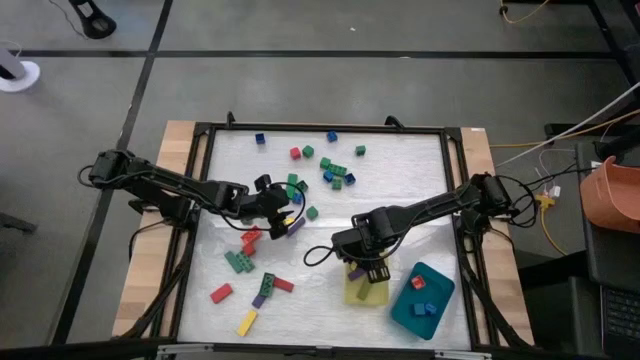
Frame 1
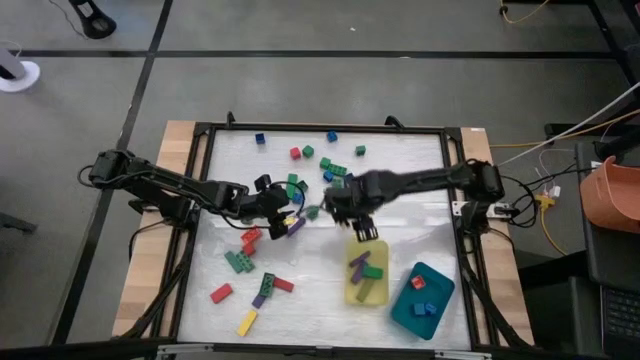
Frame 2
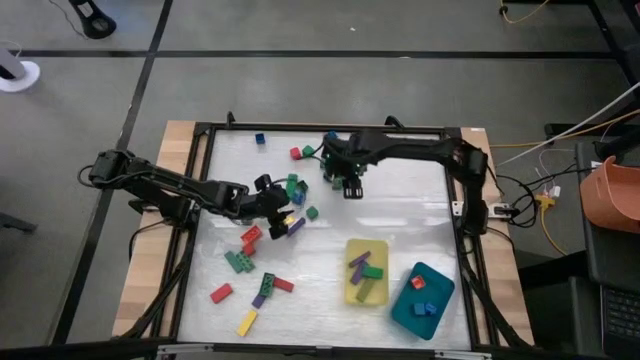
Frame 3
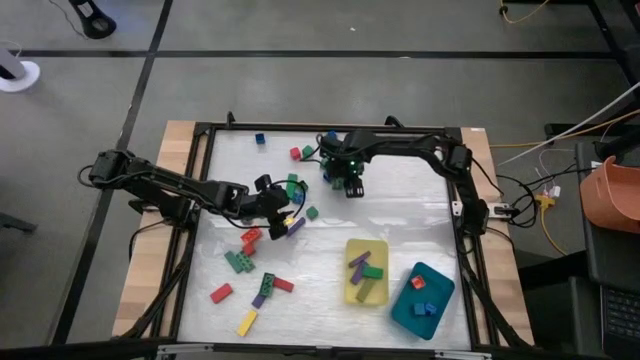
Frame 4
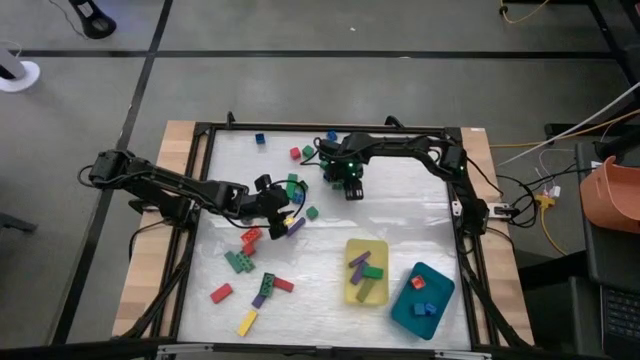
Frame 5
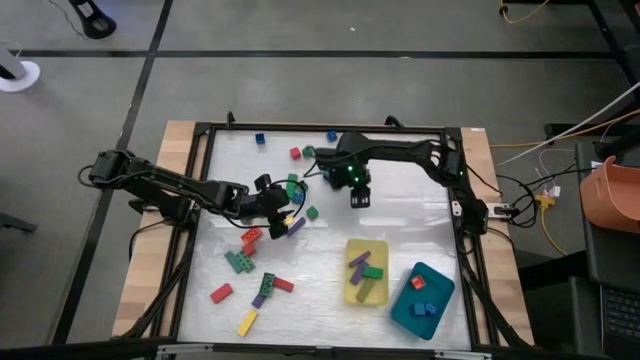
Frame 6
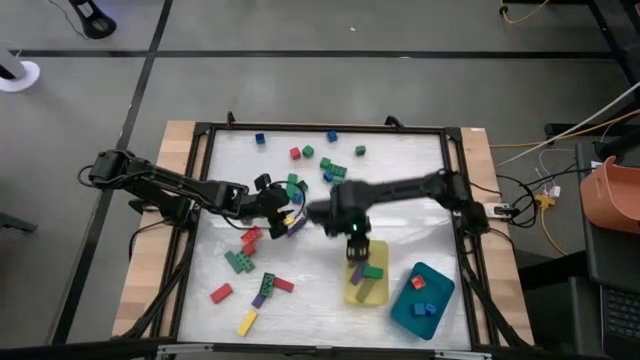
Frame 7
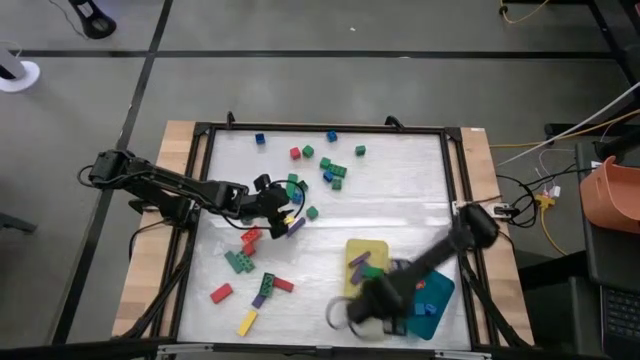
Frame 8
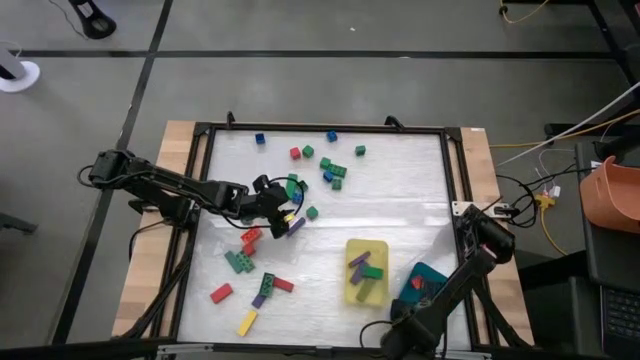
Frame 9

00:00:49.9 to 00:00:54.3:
Task: Sort blocks by size
Put the small blue game piece into the blue bin

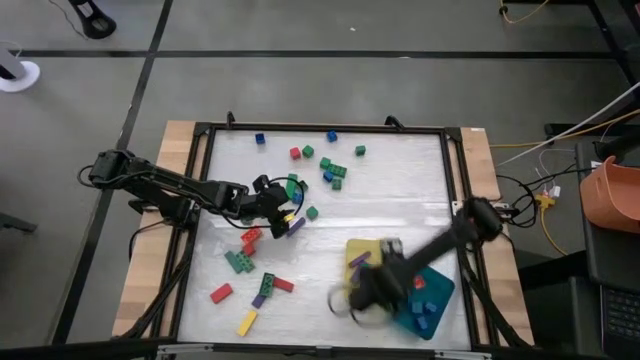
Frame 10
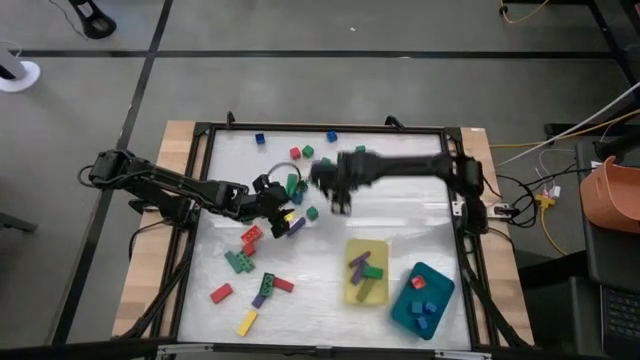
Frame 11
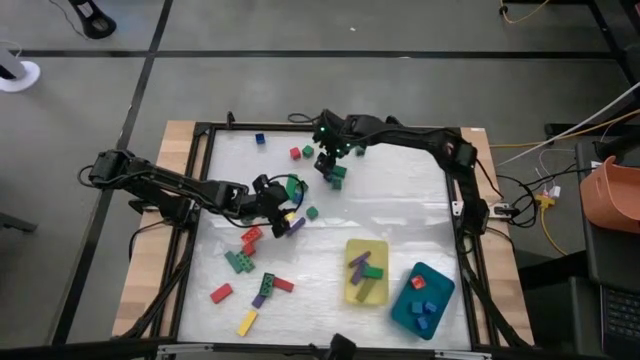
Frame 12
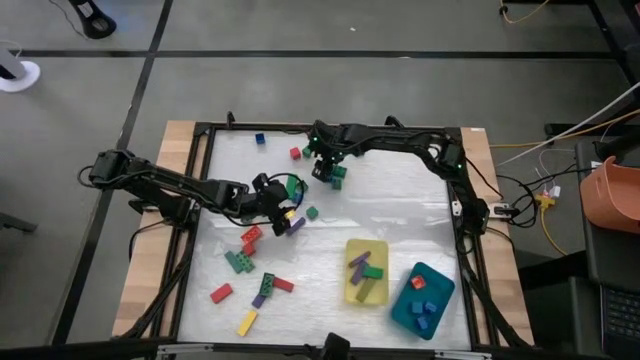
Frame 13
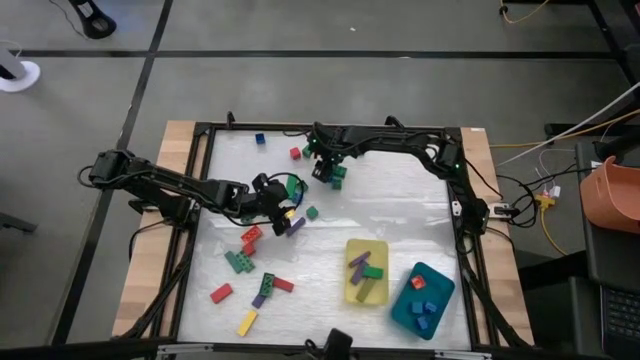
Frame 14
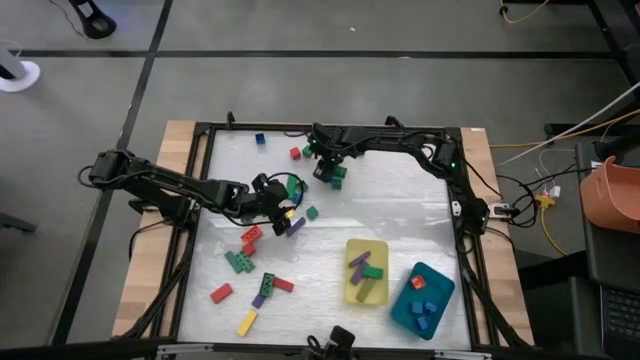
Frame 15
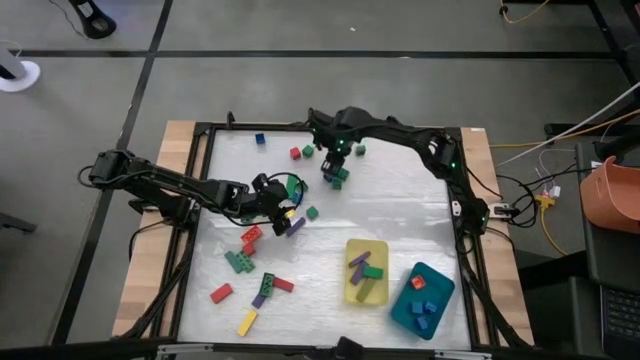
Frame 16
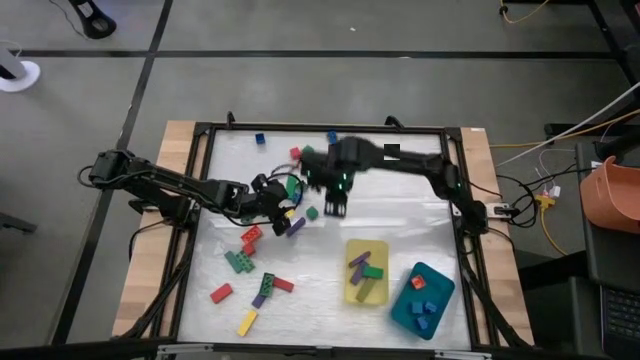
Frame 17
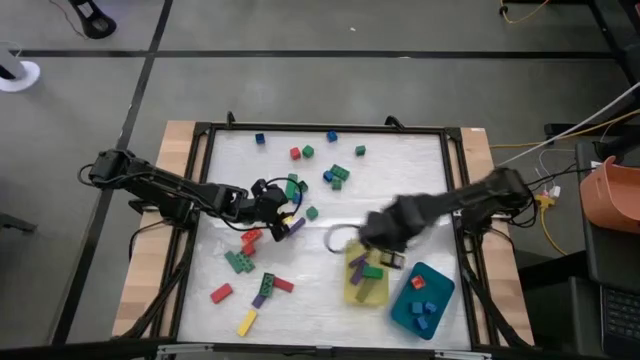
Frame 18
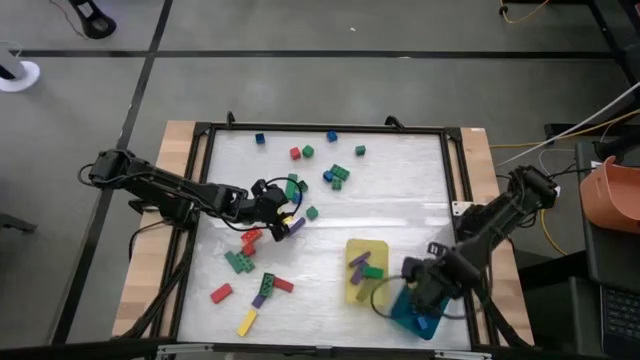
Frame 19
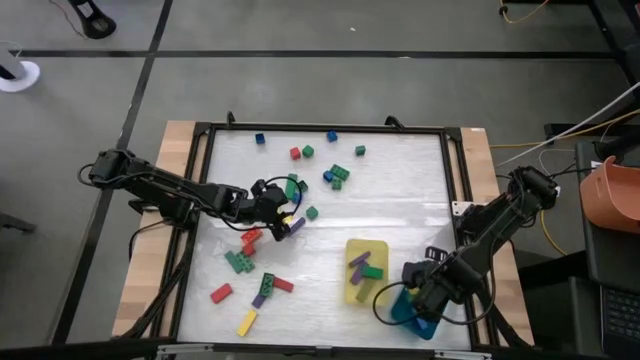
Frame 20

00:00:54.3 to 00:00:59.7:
Put the small green block into the blue bin

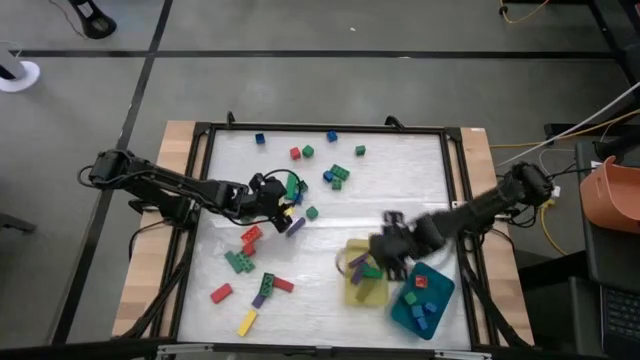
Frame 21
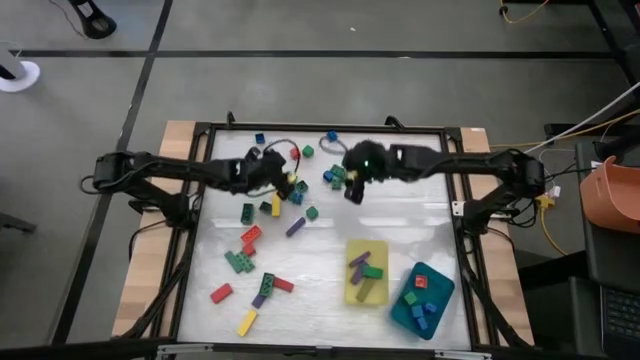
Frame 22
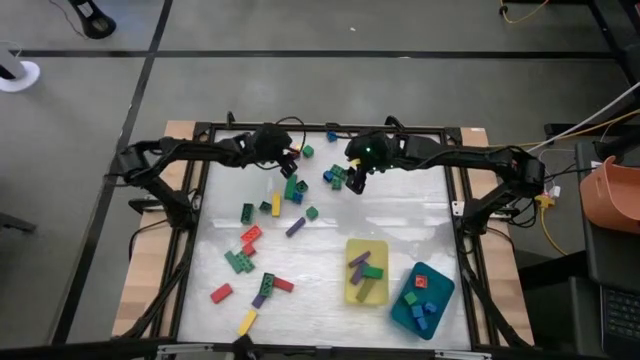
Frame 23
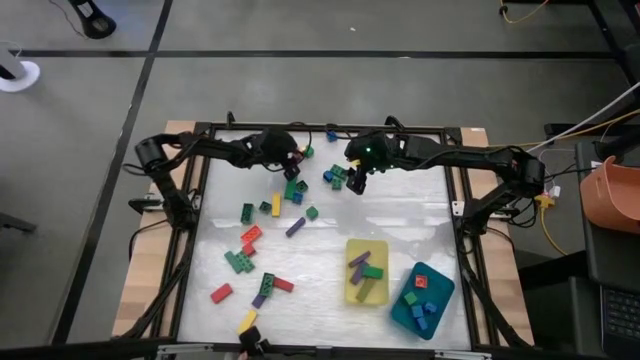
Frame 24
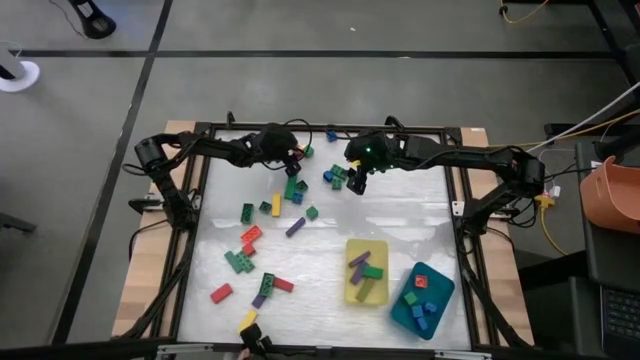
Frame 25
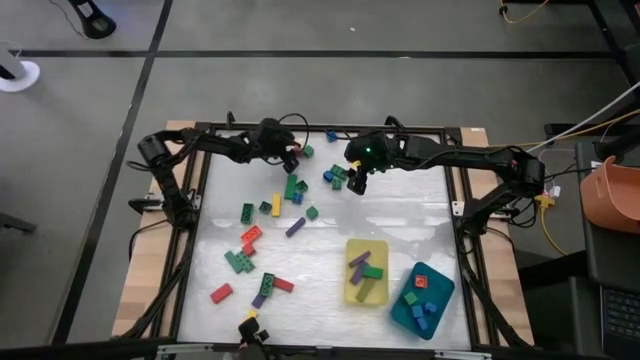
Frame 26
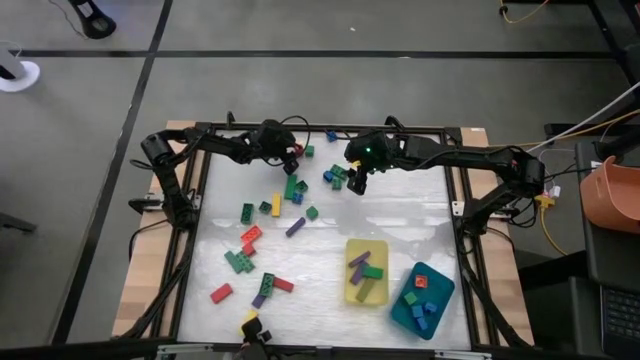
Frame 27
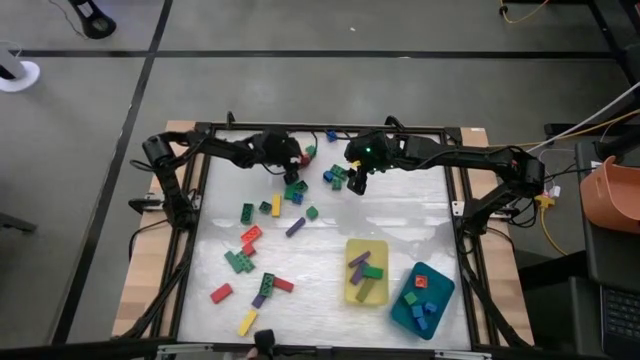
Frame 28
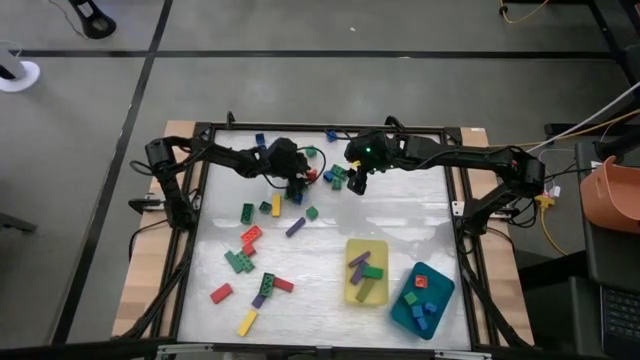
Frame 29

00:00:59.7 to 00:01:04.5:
Put the small orange block into the blue bin

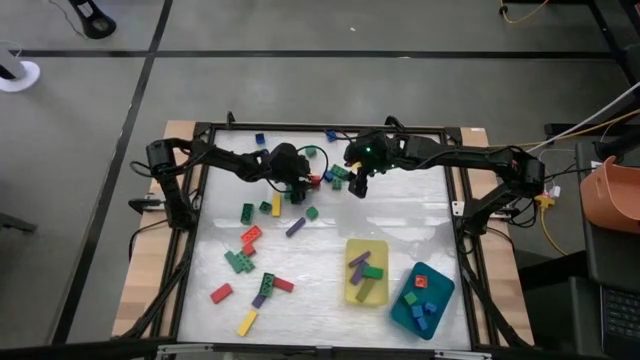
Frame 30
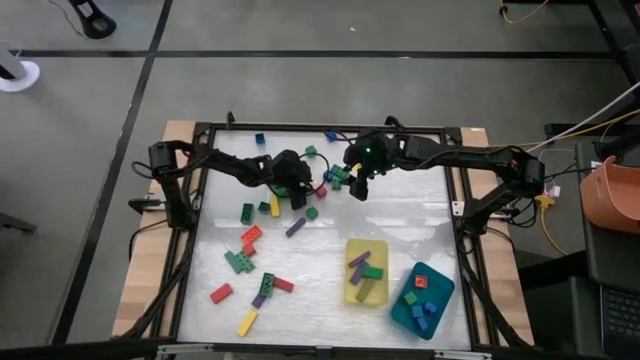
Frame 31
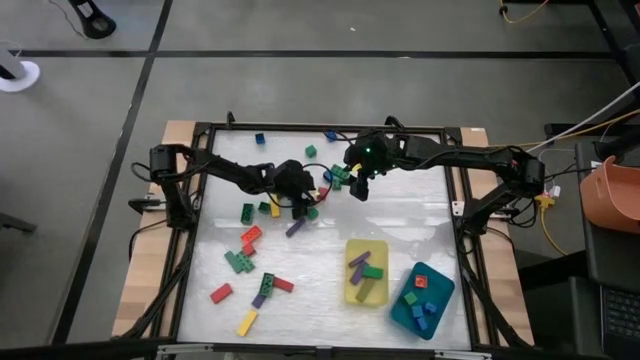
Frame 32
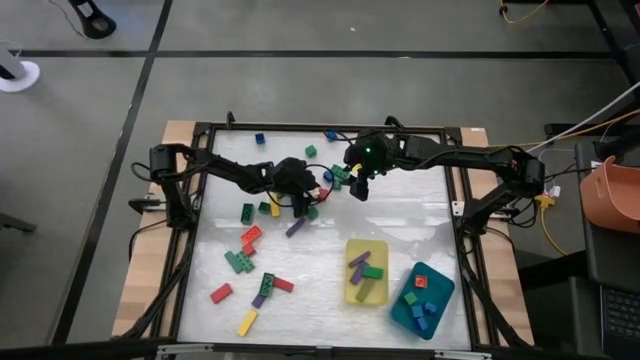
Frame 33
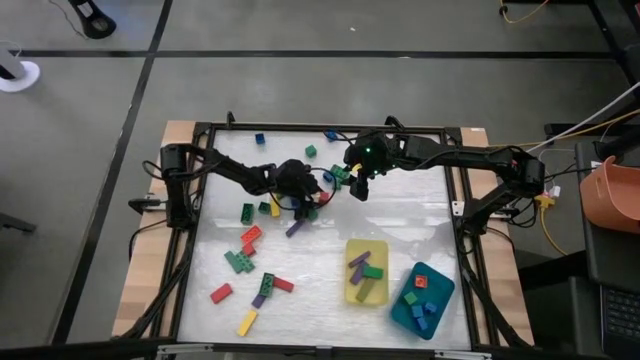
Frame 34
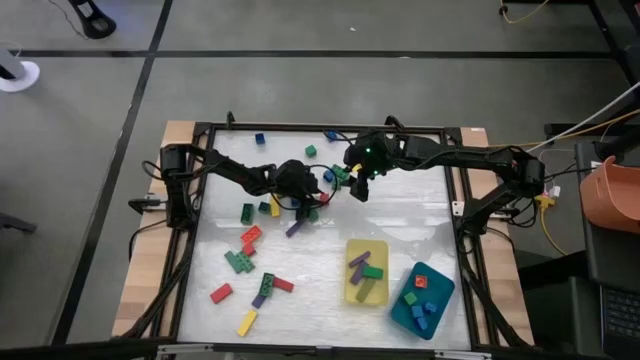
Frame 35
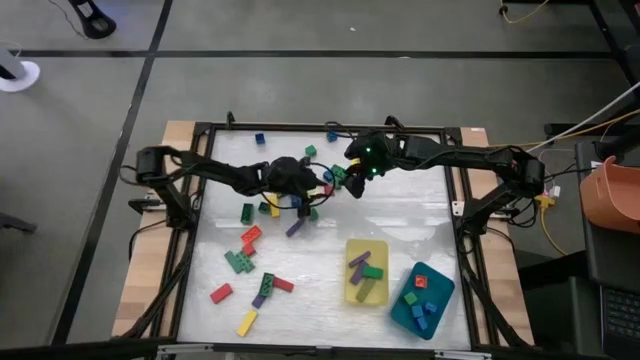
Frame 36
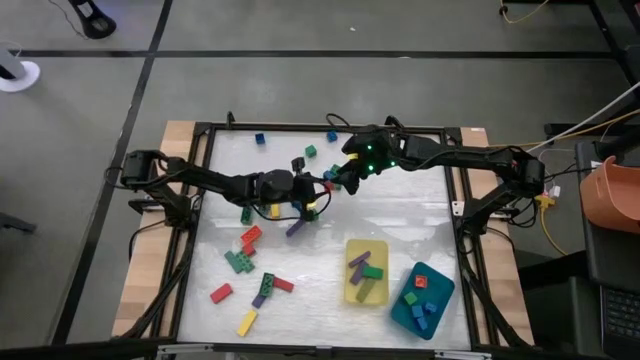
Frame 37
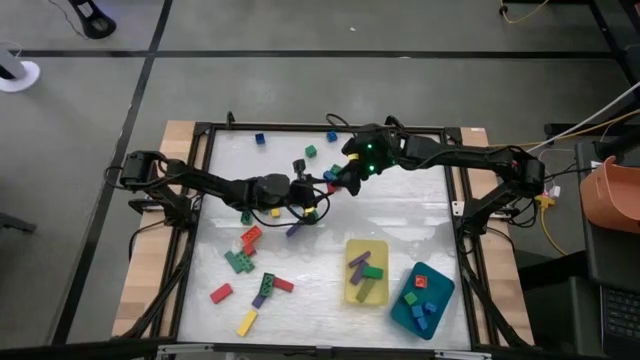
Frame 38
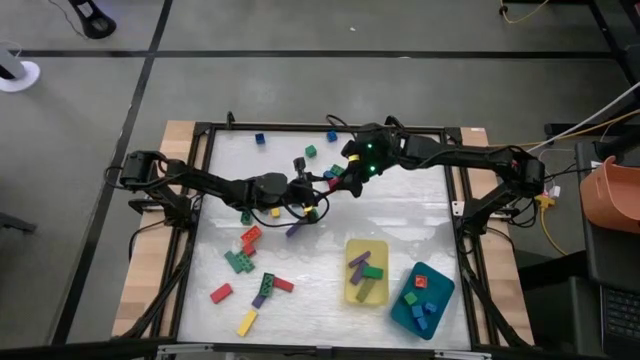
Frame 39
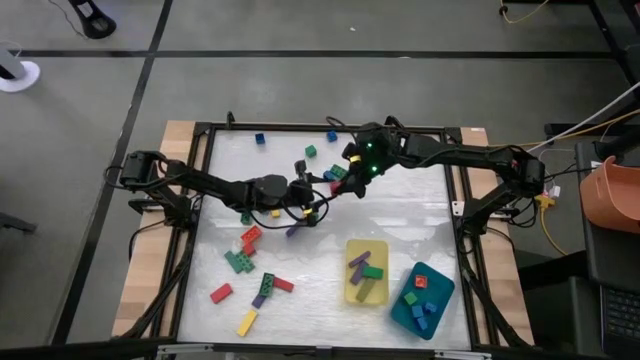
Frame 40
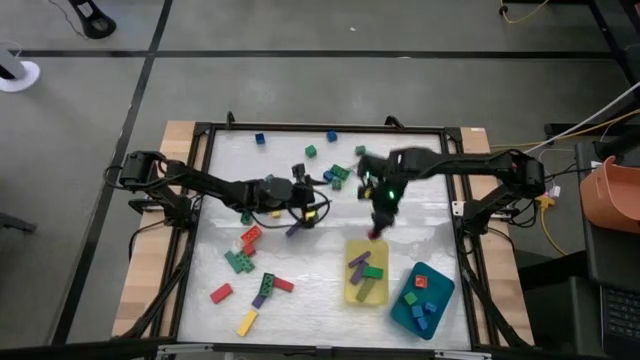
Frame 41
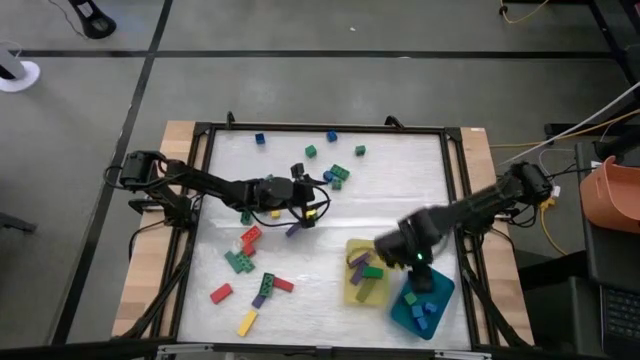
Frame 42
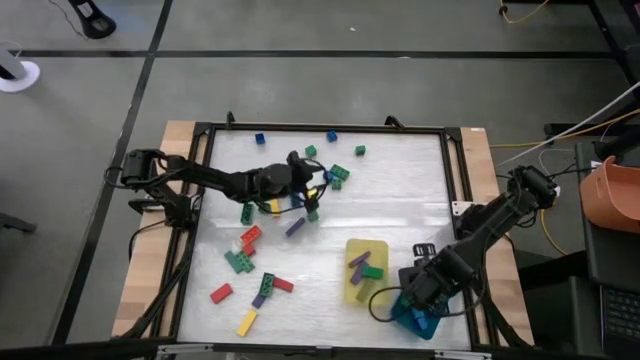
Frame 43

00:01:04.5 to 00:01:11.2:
Put the small orange block into the blue bin

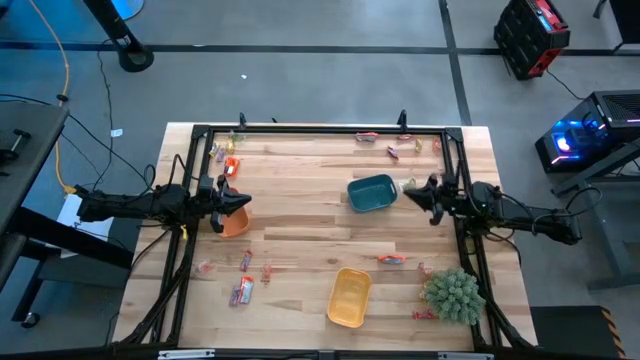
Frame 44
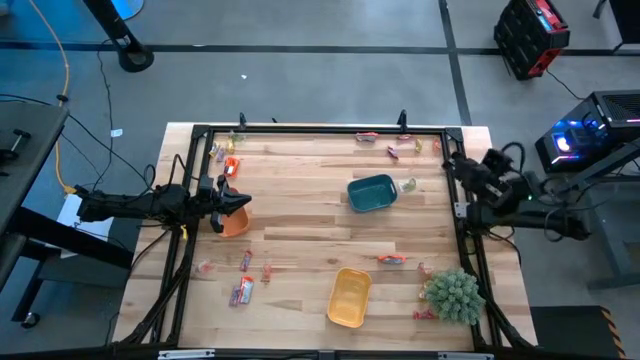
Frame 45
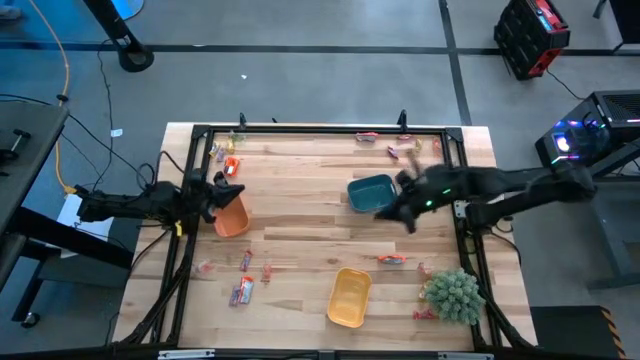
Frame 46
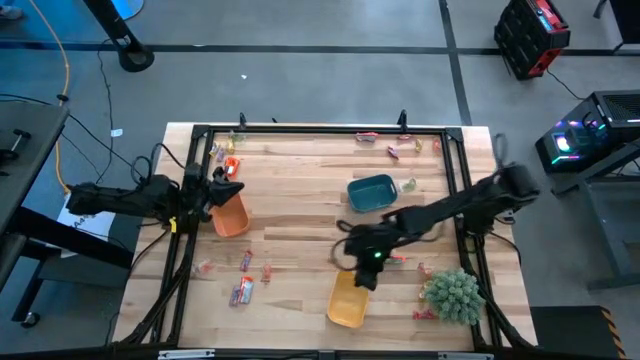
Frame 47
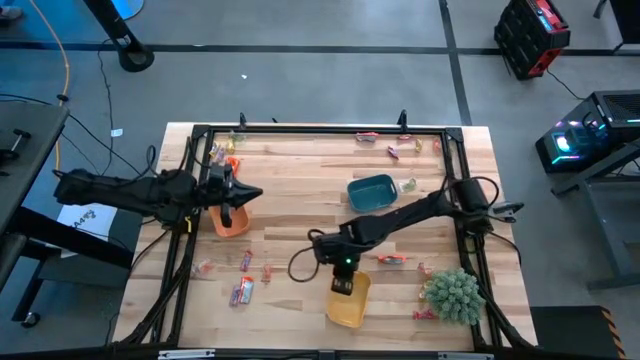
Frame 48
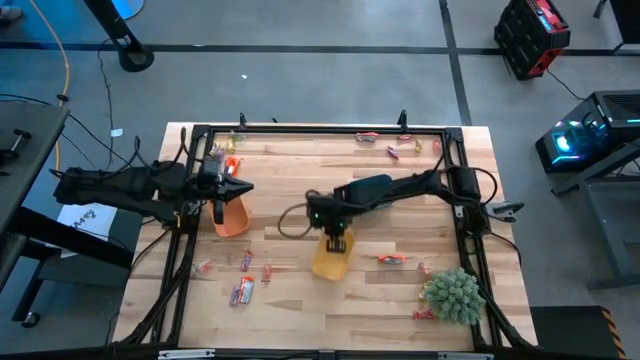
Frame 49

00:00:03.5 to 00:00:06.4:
Task: Sort candy
Move the yellow bin to the center of the table
